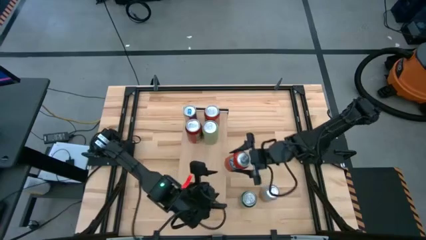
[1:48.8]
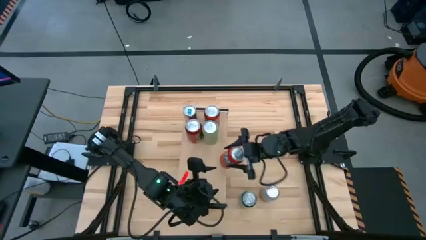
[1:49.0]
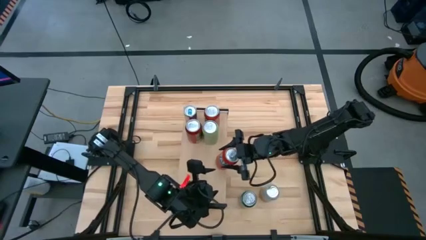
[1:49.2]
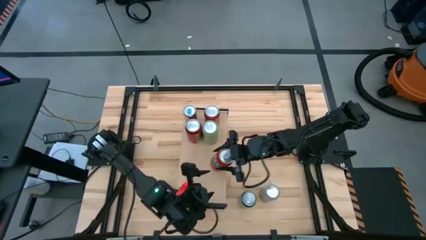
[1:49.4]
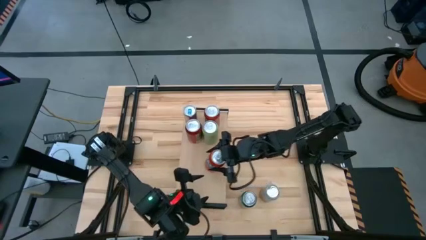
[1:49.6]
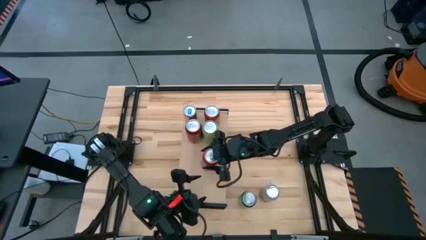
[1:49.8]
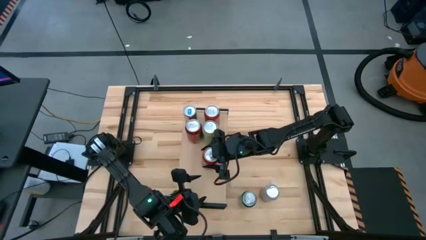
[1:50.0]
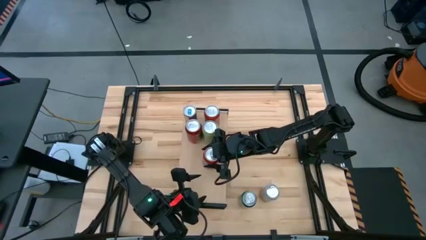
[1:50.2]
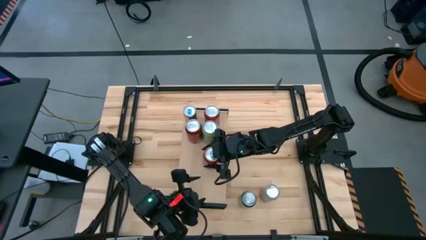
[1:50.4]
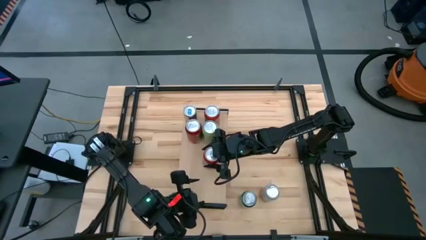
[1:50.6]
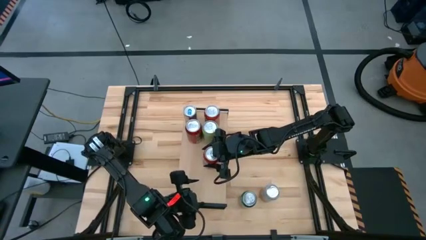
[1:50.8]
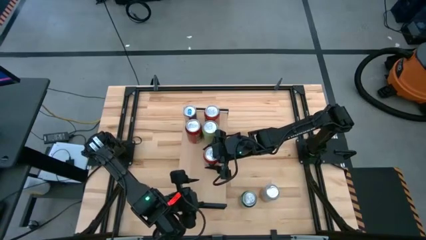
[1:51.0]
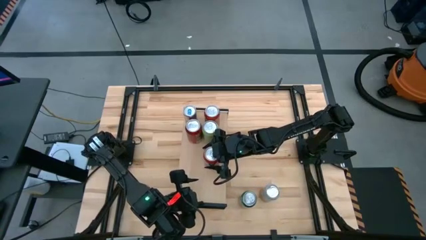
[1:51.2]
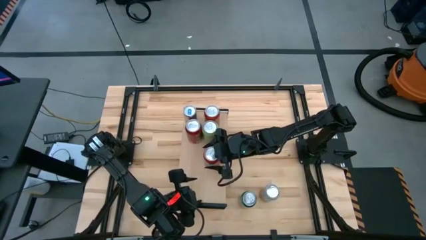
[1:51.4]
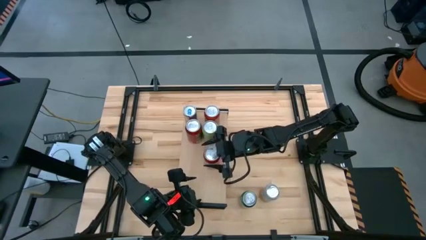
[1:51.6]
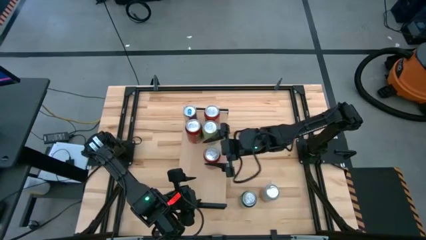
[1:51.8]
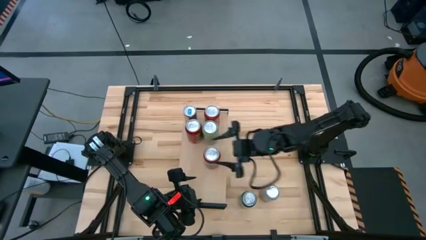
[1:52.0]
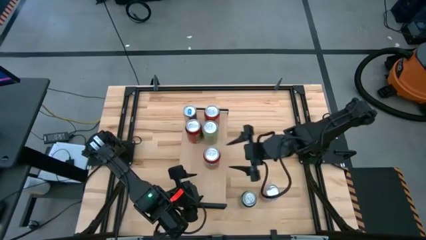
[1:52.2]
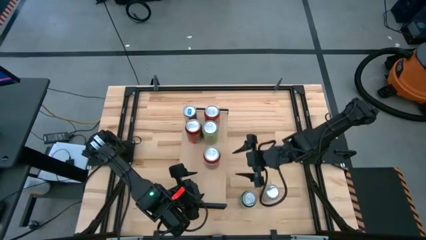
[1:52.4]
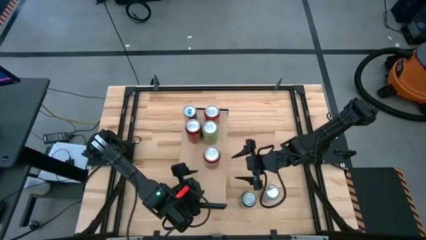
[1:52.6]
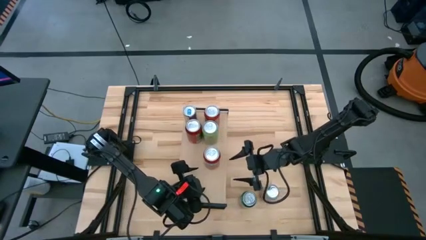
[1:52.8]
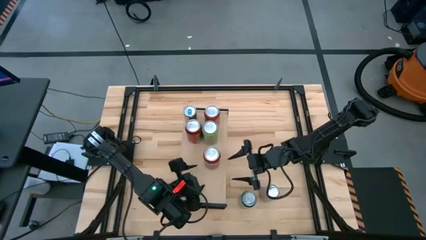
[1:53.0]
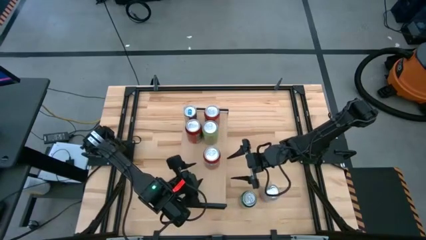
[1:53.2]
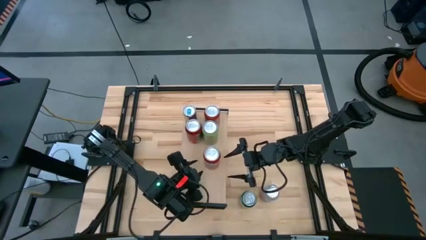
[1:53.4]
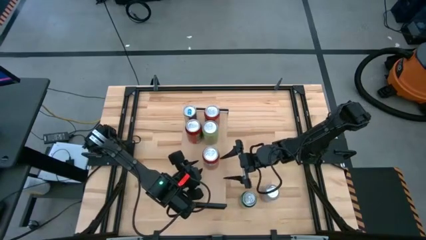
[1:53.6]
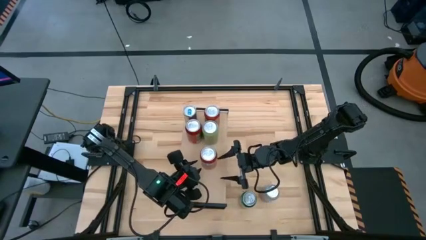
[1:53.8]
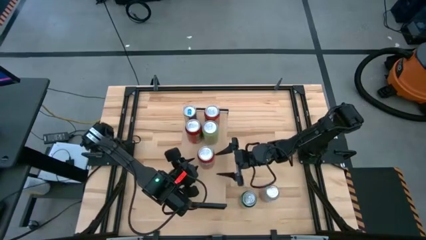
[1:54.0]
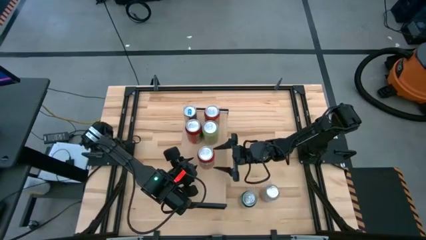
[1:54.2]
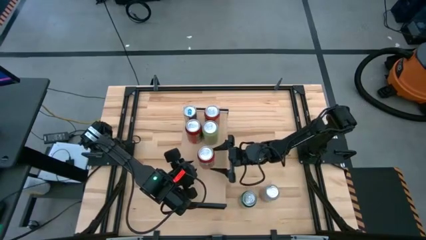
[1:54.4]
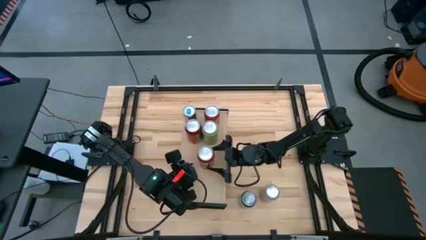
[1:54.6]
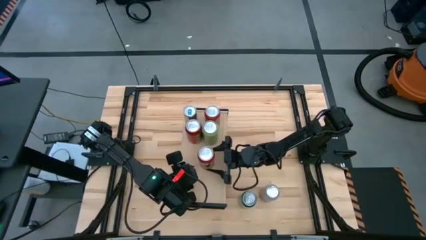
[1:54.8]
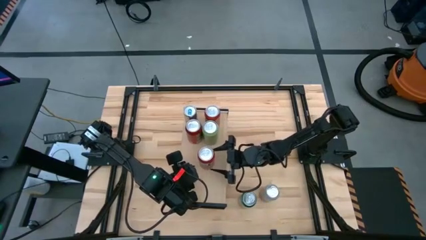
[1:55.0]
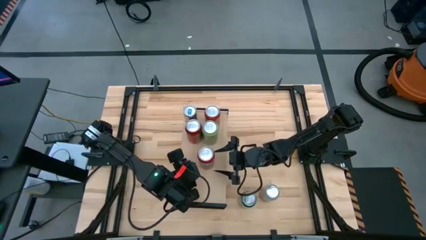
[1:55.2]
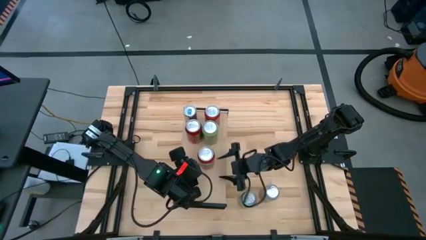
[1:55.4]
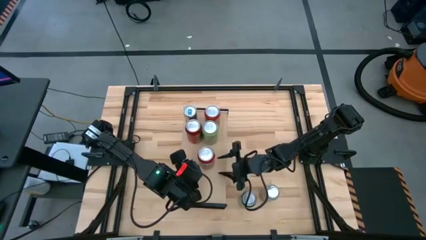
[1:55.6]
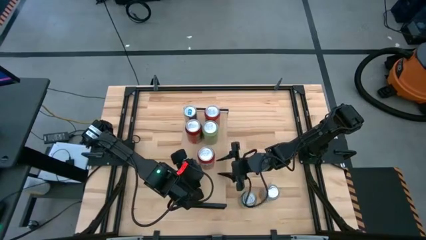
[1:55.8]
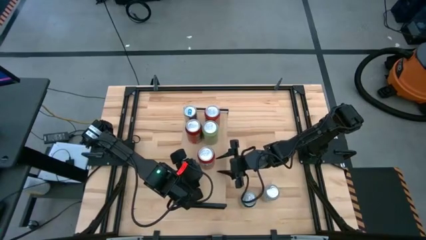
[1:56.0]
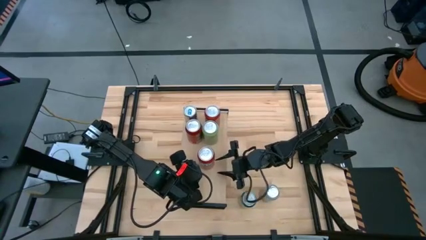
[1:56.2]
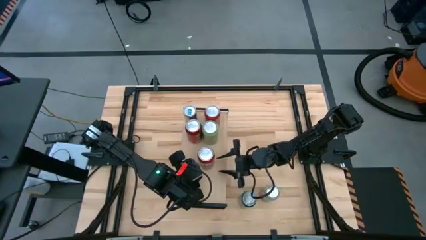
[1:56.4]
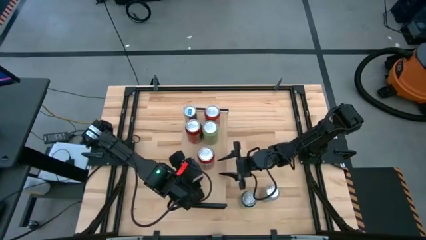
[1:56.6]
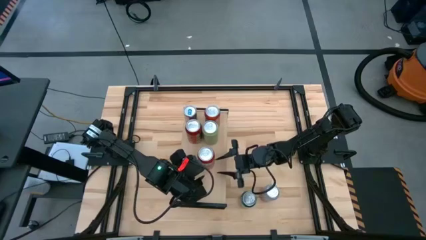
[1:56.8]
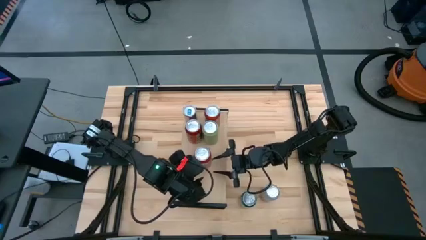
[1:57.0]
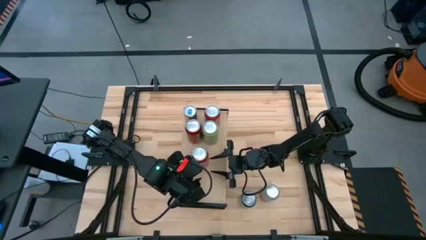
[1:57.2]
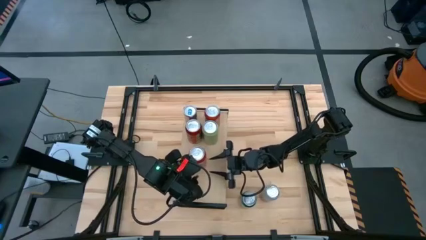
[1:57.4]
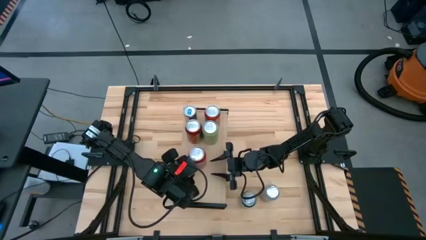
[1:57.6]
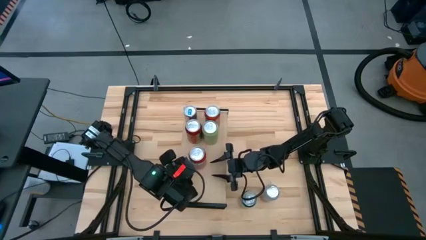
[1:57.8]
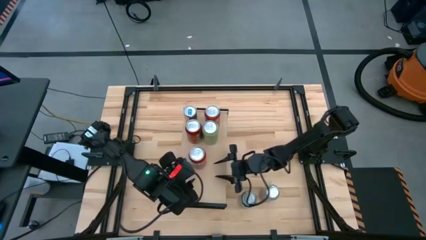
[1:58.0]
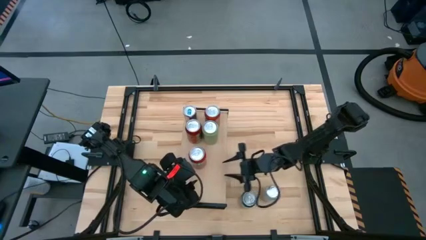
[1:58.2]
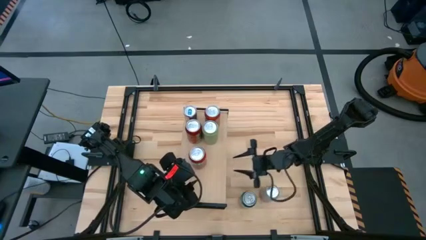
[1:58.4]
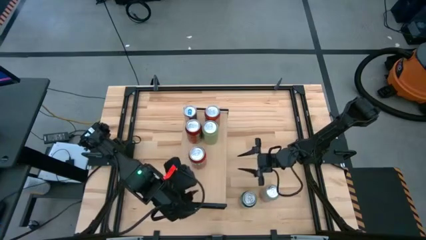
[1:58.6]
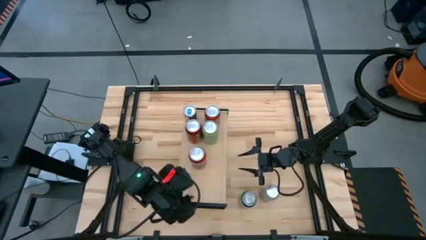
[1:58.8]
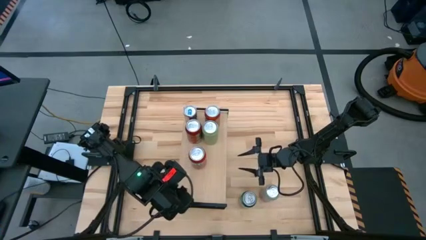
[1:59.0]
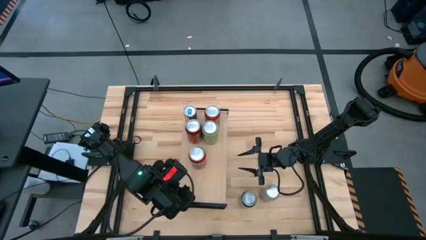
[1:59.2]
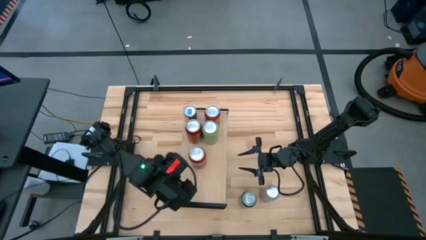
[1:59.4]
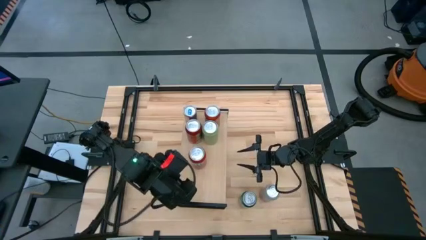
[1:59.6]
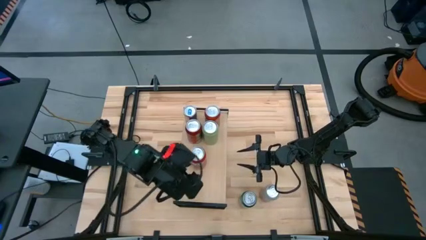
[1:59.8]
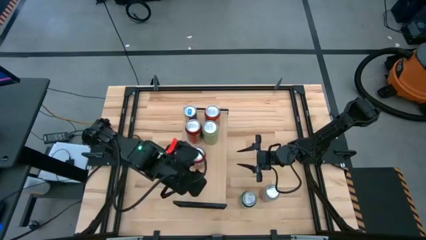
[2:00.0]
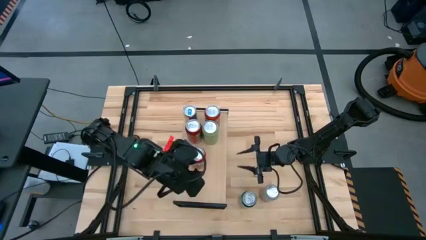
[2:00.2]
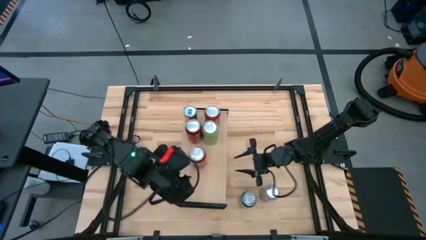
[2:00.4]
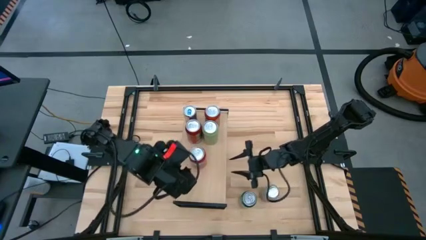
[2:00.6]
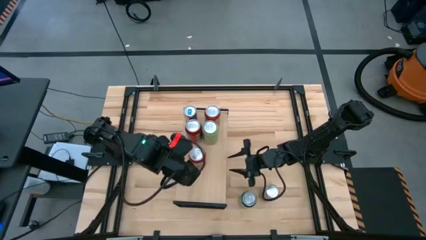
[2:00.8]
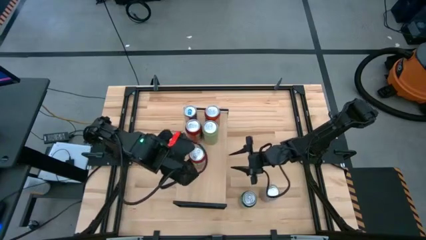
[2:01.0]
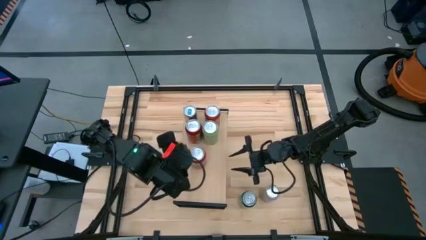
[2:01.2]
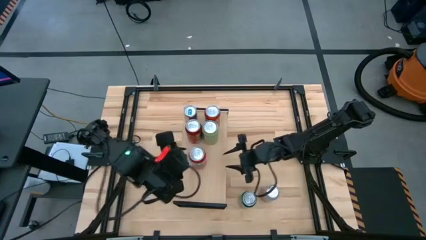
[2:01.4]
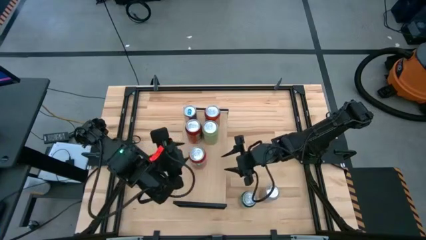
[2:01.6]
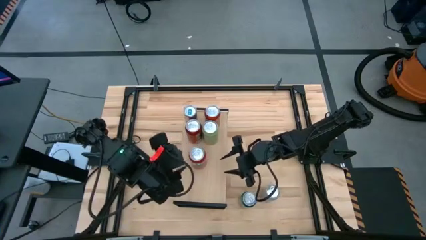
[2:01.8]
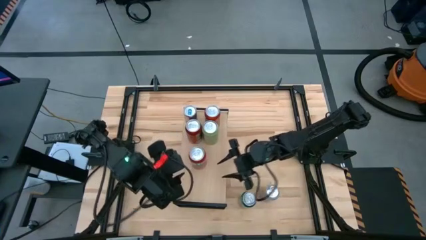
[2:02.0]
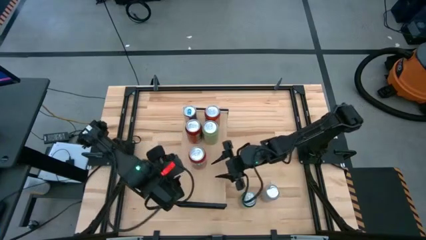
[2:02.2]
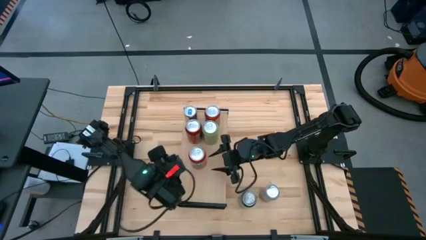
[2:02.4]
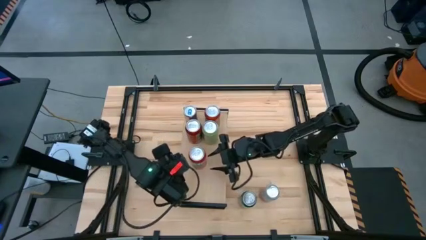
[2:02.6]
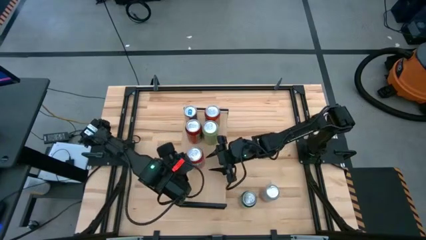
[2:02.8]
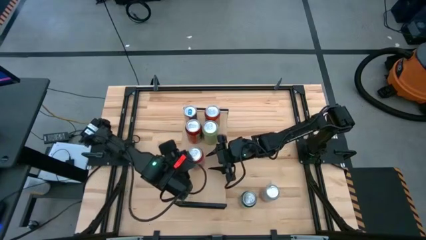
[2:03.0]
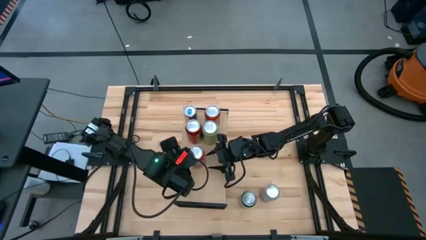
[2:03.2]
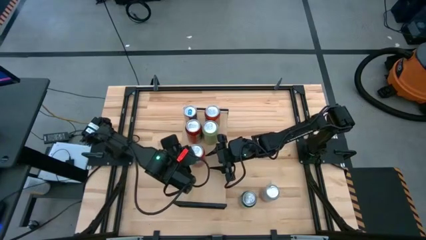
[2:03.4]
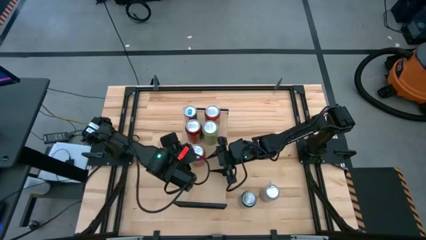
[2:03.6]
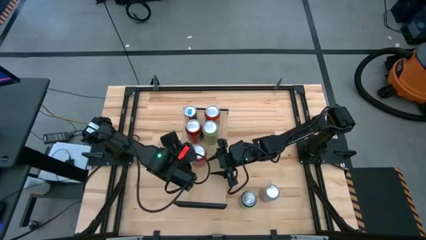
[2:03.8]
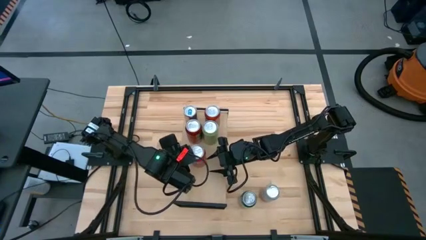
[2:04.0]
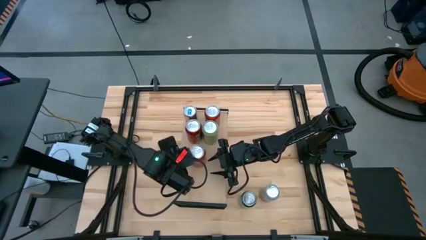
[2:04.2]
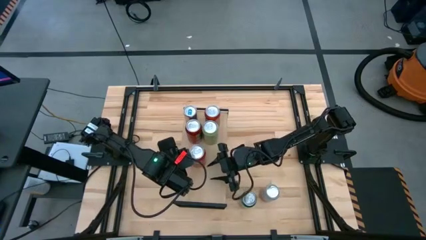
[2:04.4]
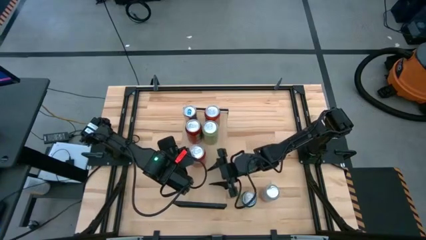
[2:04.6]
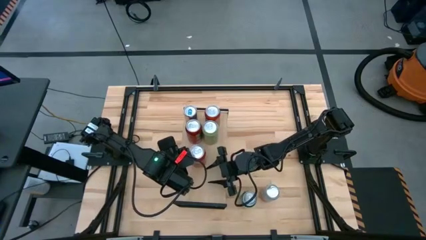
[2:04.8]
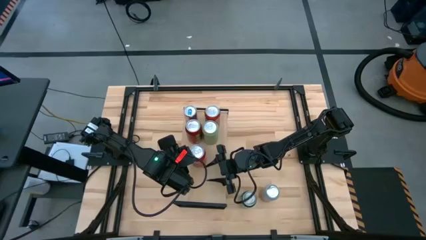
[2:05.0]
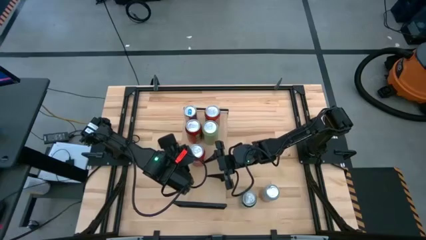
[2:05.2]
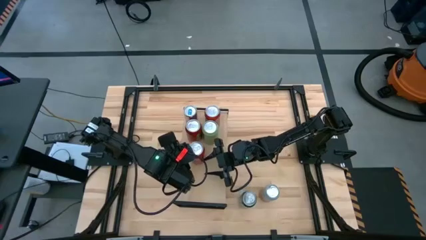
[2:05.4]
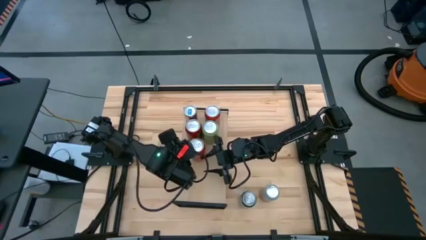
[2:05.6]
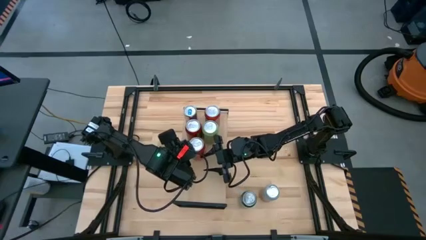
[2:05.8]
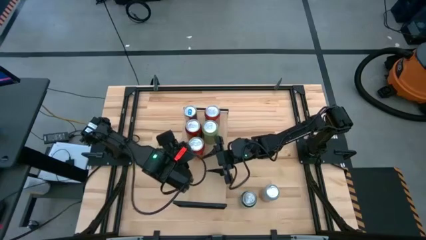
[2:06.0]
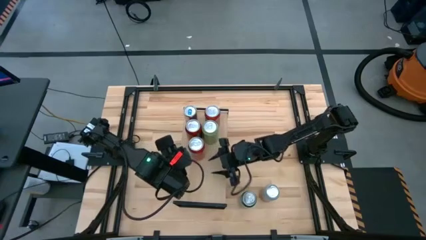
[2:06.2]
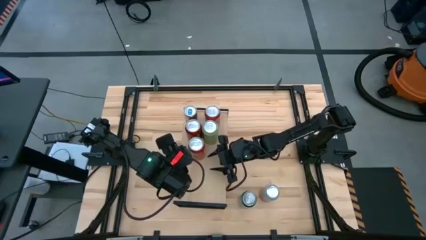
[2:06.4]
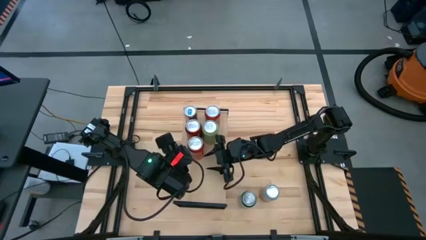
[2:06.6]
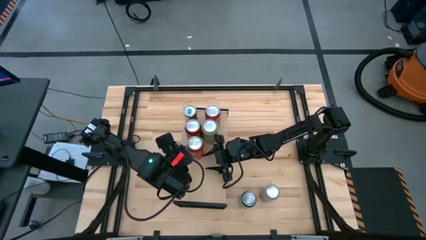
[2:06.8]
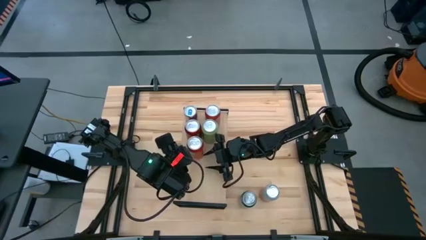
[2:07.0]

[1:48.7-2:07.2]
Task: Place canned beverage on shelf
Put the red soda can on the shelf
